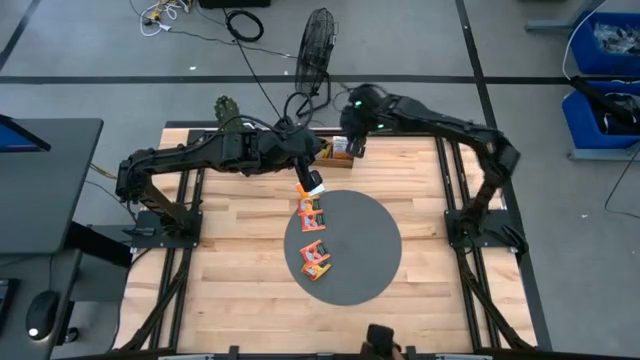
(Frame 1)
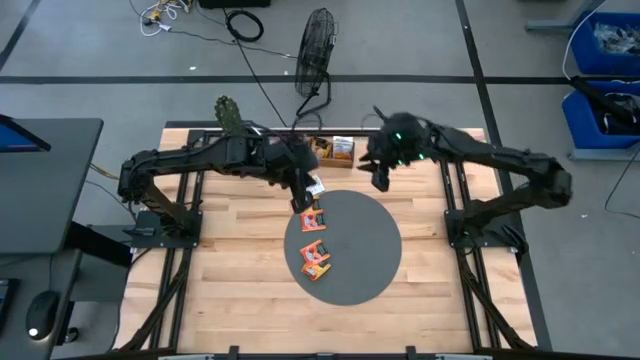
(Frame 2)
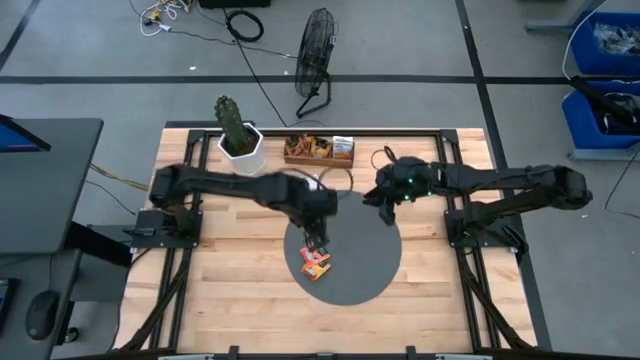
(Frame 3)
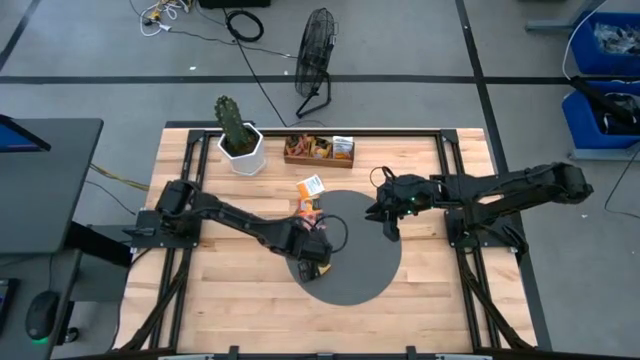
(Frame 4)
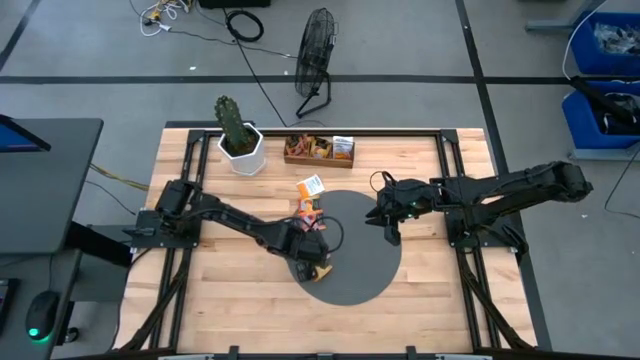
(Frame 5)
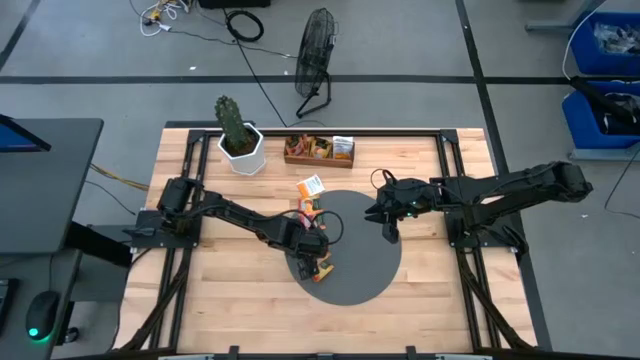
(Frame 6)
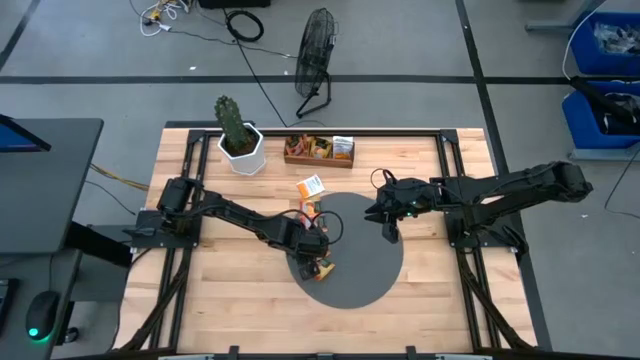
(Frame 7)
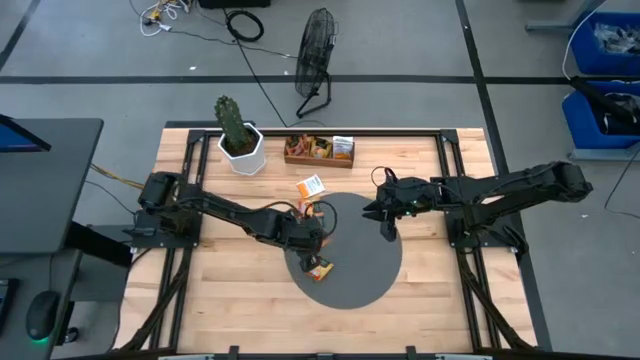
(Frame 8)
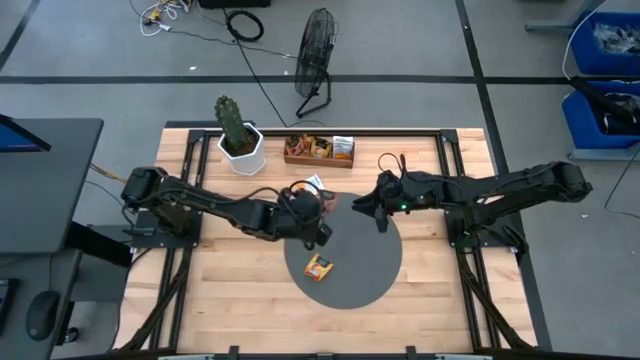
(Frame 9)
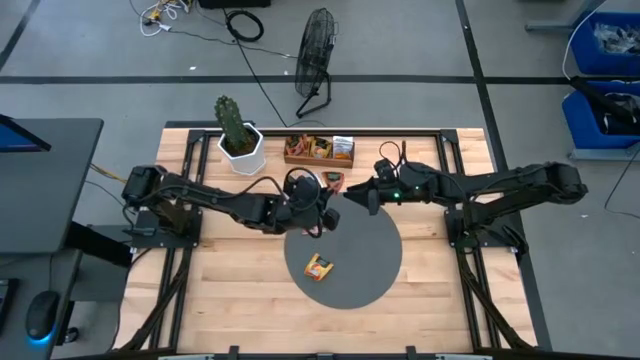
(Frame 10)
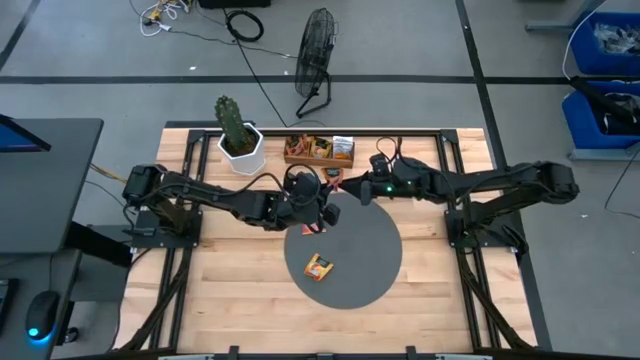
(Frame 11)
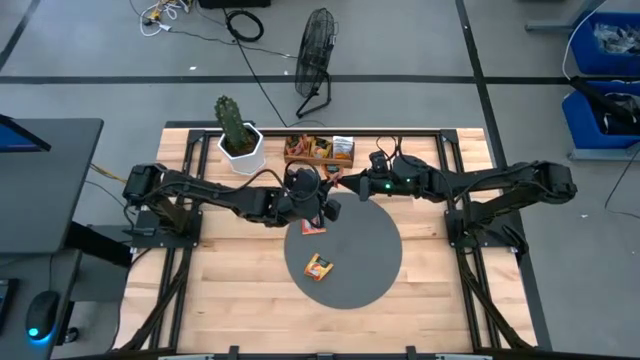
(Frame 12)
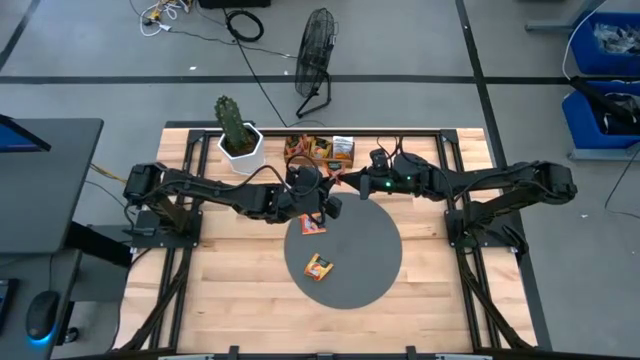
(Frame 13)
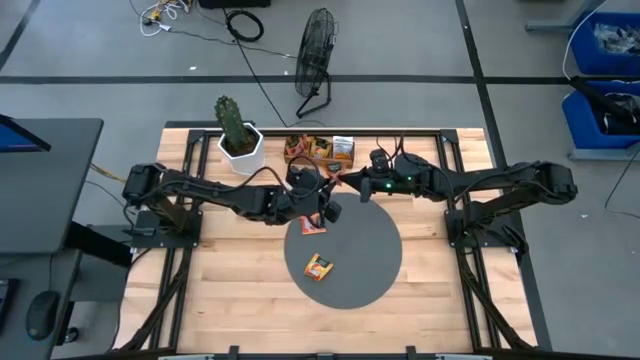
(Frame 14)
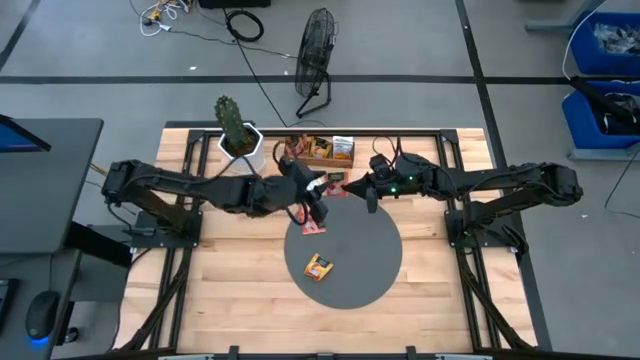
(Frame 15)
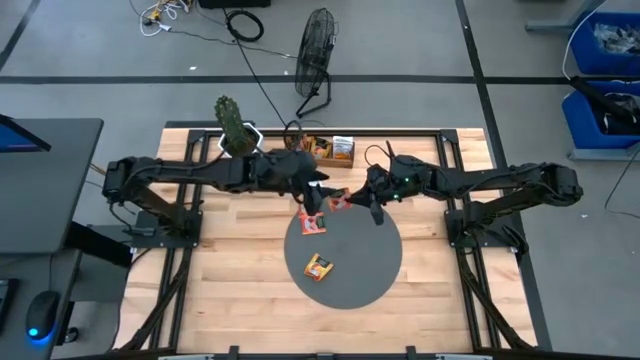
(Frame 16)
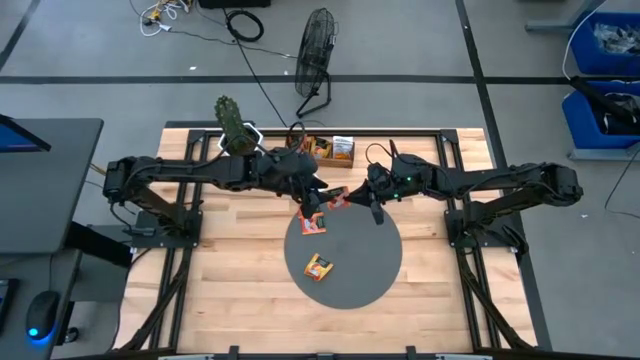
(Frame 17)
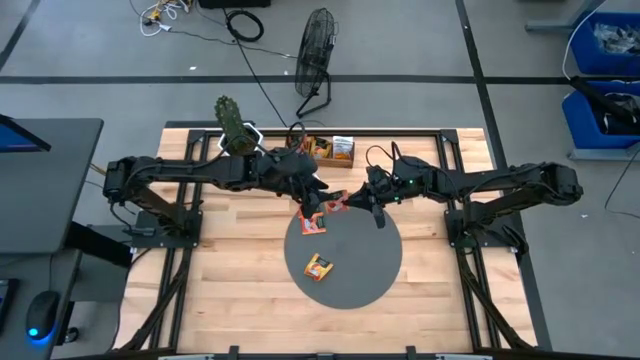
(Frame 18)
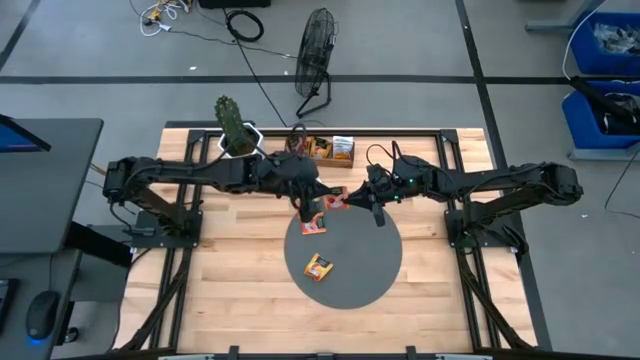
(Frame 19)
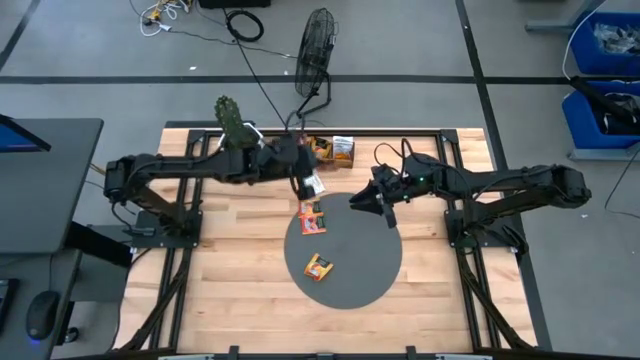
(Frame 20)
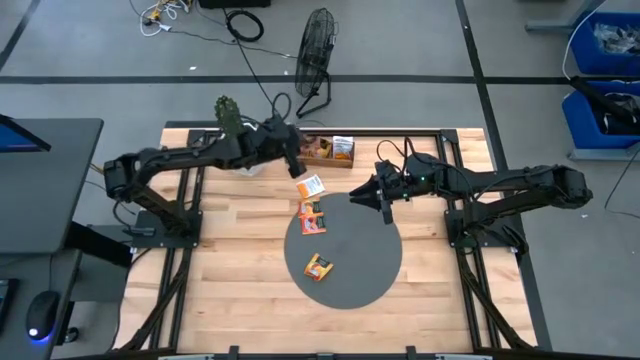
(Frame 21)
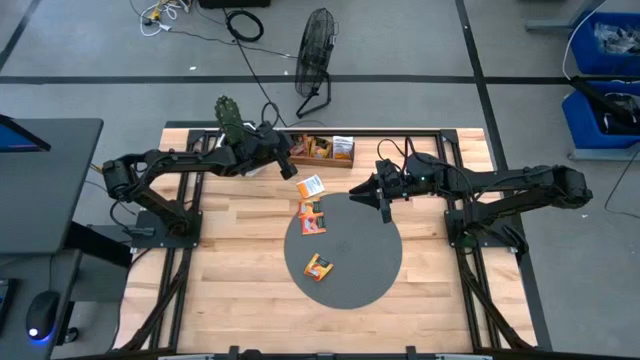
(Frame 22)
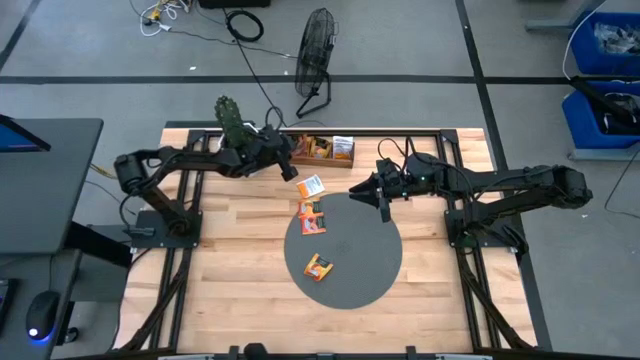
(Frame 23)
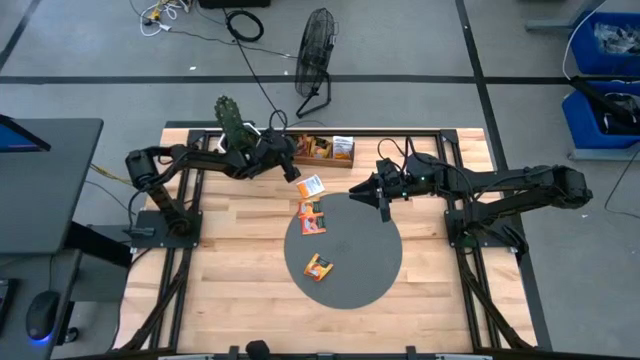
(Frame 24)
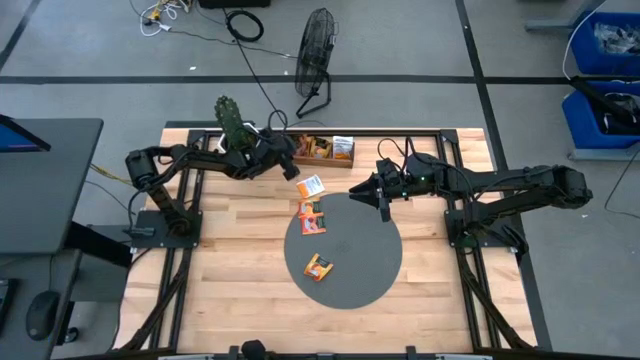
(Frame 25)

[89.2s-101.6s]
Task: Pick & Place Tea
Put the orange tea bag into the left section of the wooden organizer

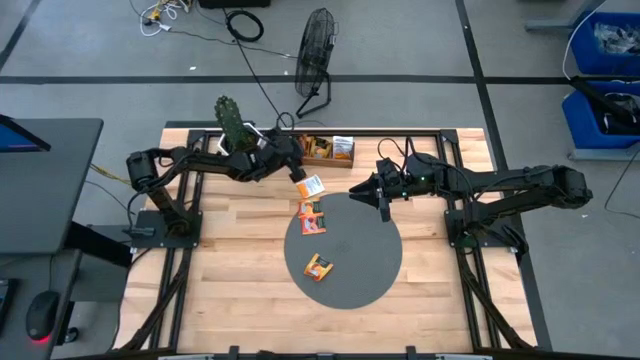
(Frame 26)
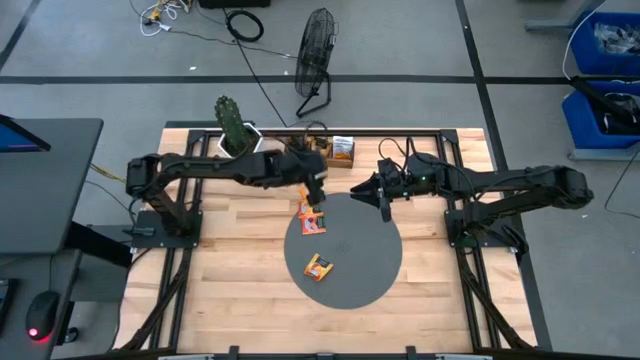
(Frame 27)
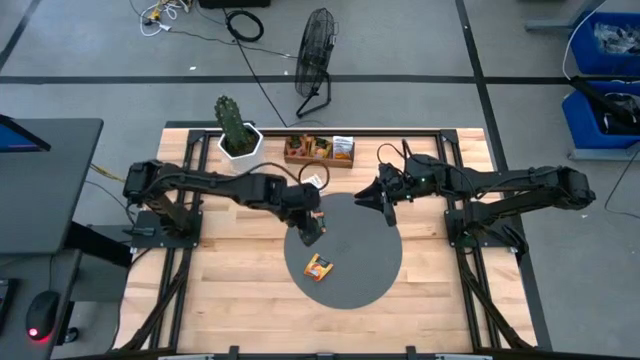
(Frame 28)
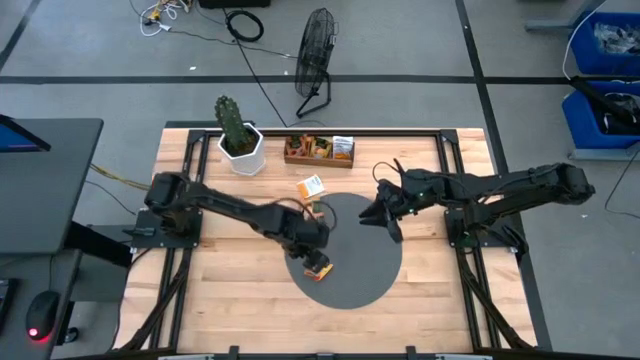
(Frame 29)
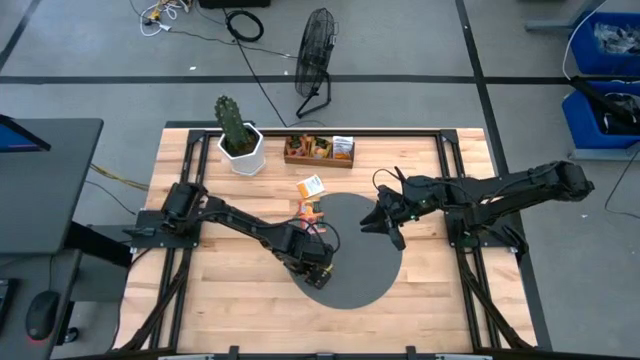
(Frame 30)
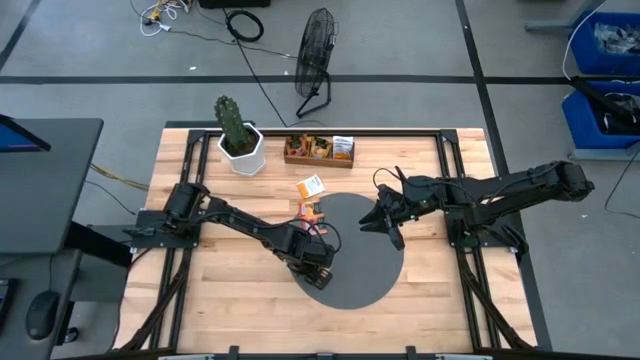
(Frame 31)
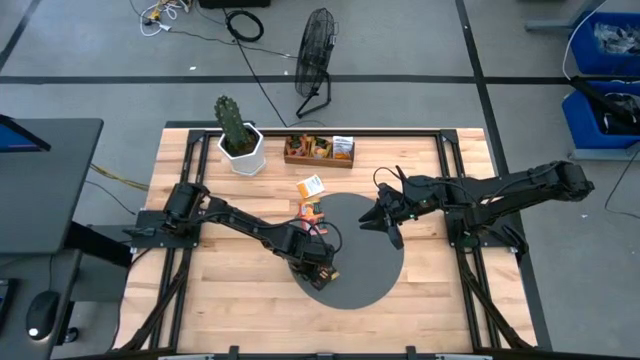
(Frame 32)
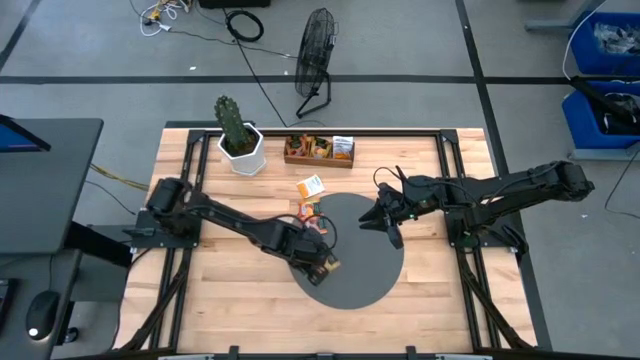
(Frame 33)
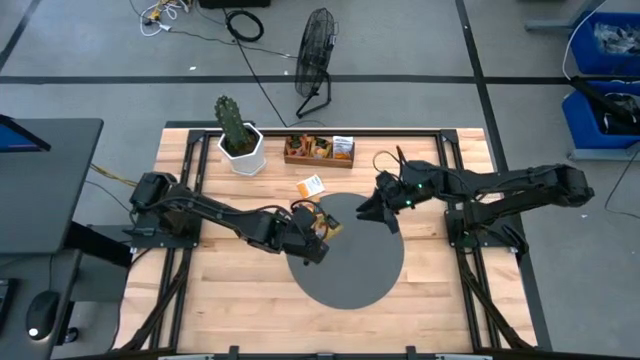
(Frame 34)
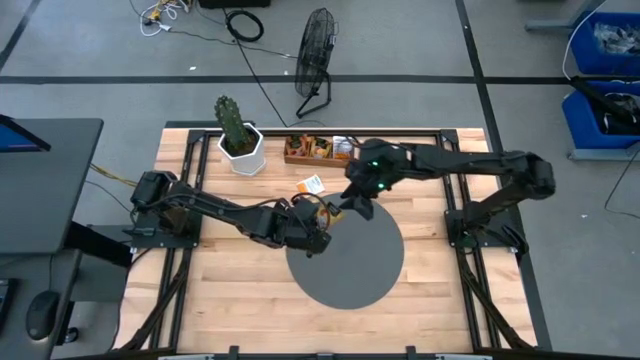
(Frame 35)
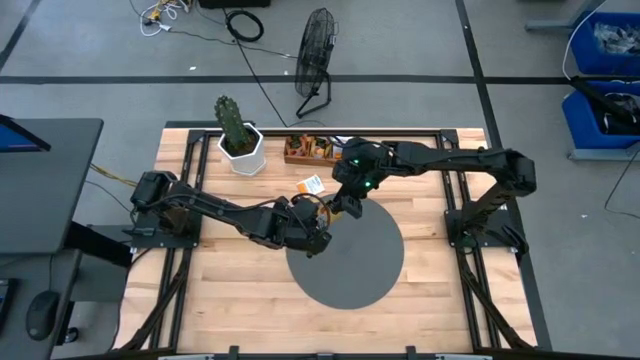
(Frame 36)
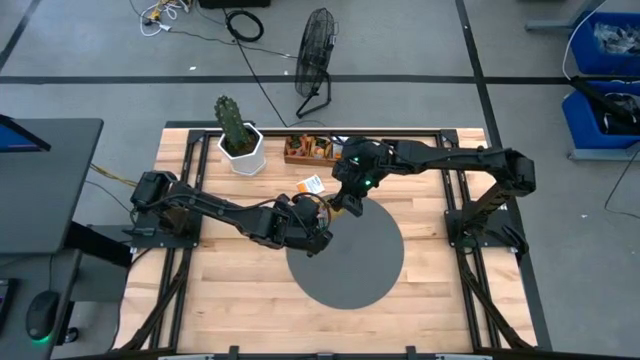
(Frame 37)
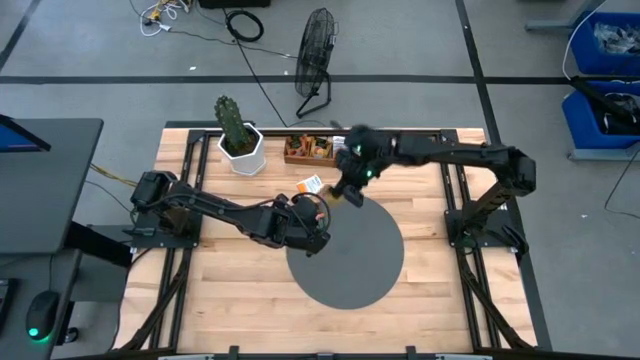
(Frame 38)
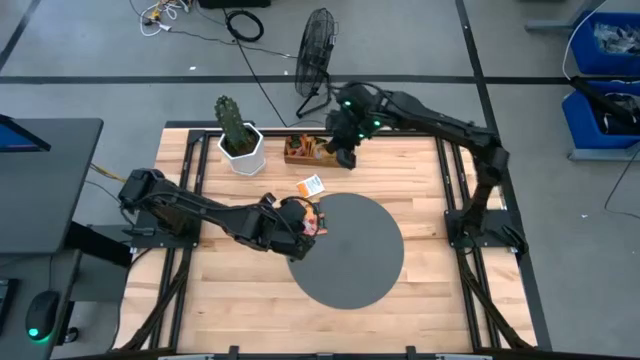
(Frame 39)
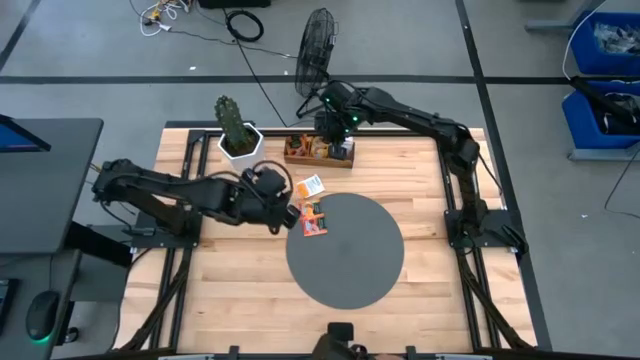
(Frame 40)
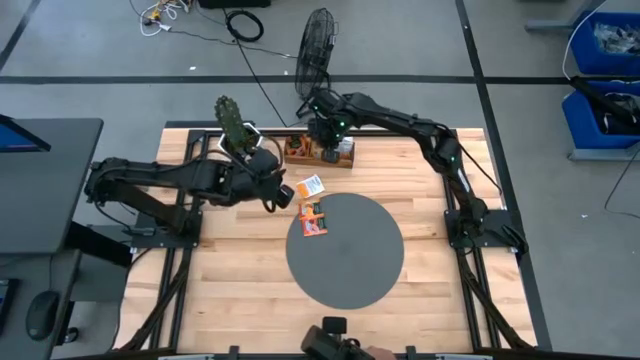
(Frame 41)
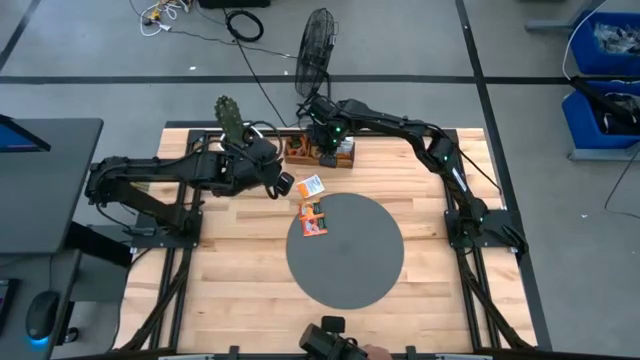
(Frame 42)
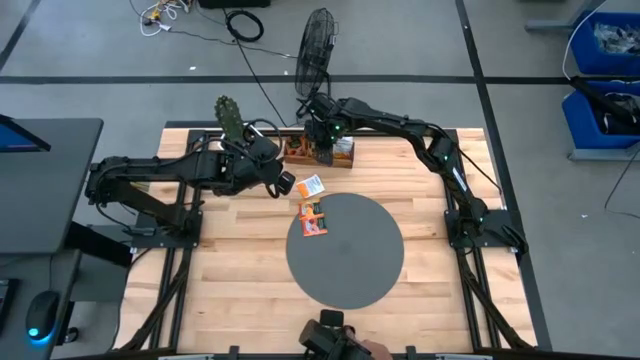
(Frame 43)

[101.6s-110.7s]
Put the yellow tea bag into the middle section of the wooden organizer
